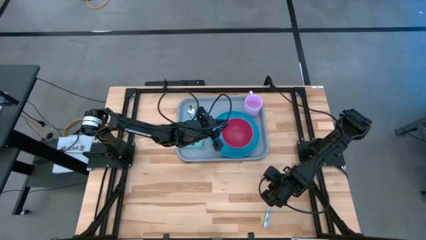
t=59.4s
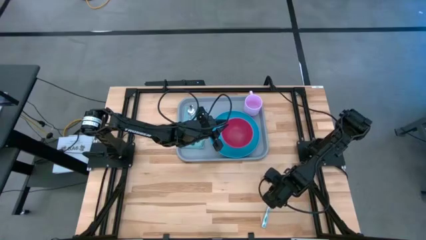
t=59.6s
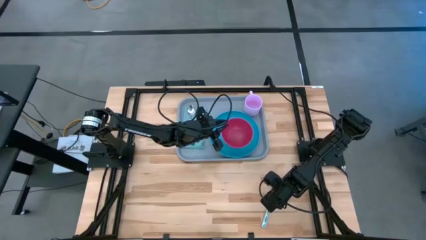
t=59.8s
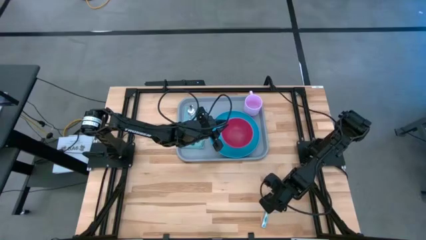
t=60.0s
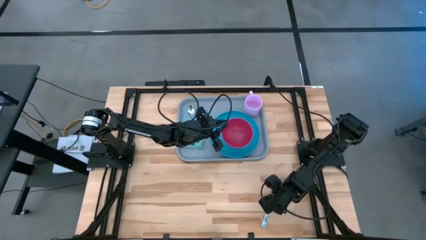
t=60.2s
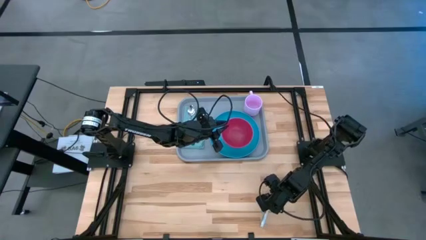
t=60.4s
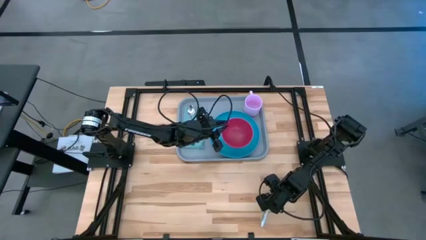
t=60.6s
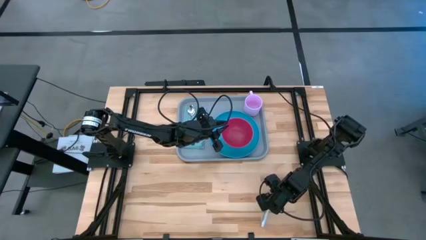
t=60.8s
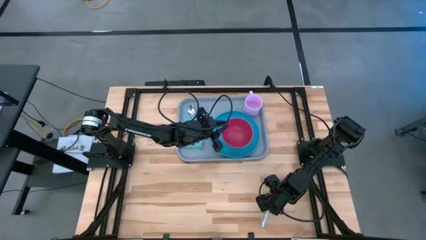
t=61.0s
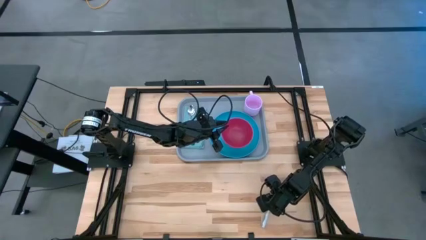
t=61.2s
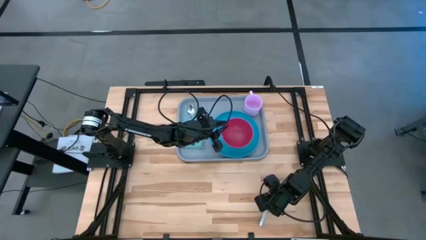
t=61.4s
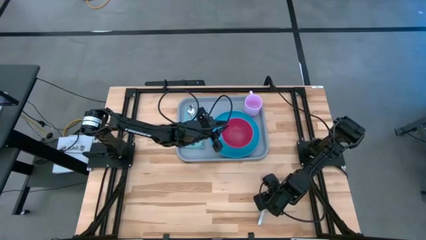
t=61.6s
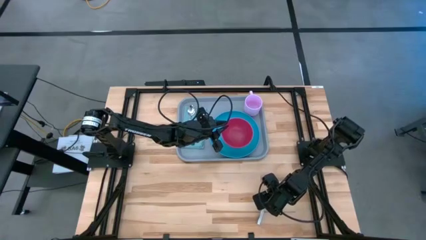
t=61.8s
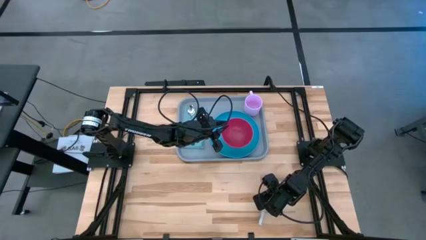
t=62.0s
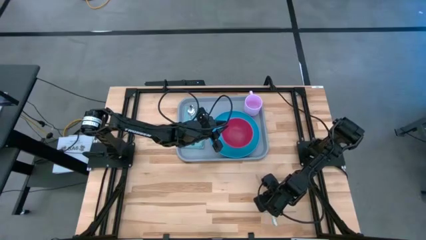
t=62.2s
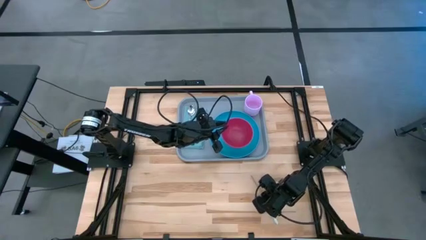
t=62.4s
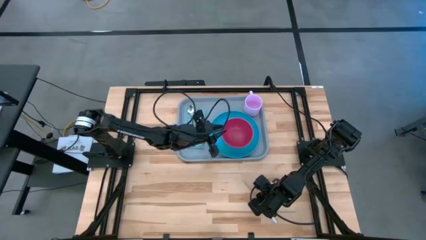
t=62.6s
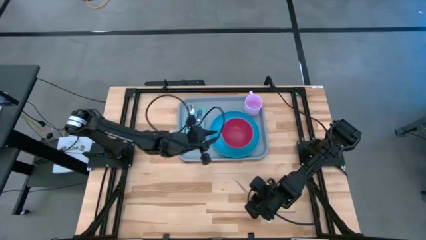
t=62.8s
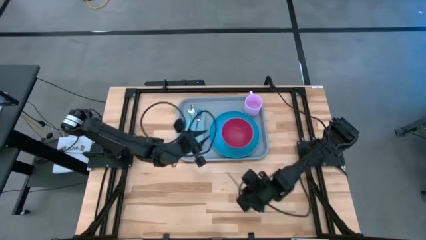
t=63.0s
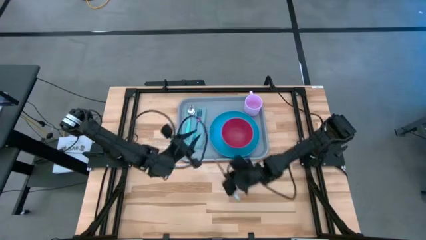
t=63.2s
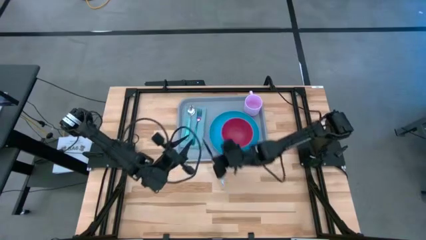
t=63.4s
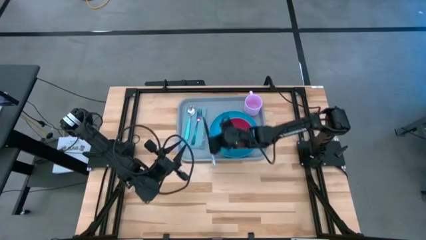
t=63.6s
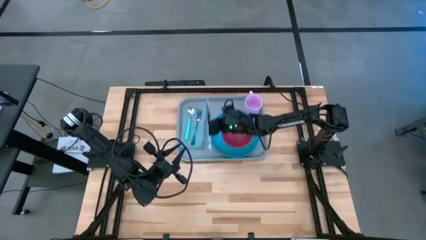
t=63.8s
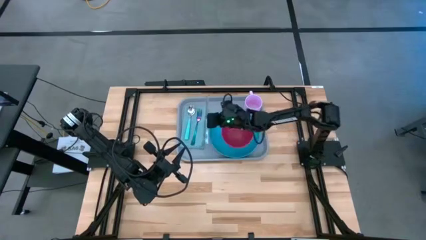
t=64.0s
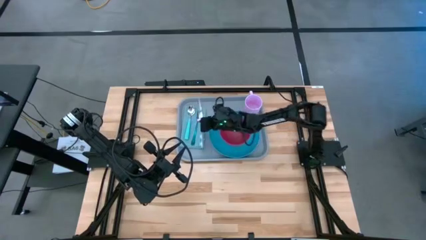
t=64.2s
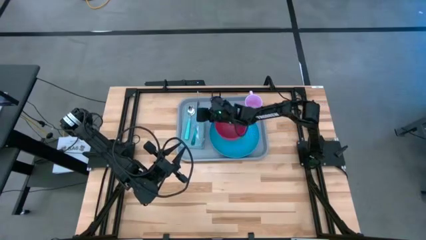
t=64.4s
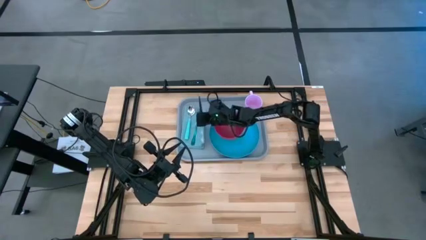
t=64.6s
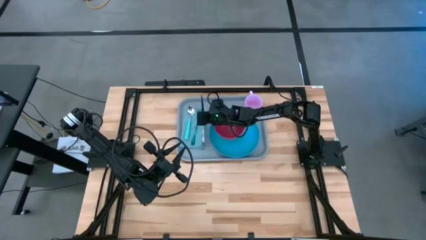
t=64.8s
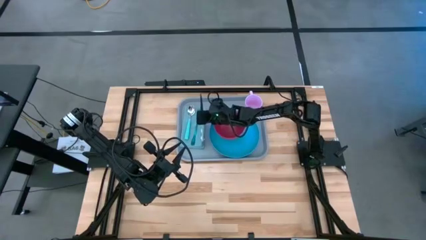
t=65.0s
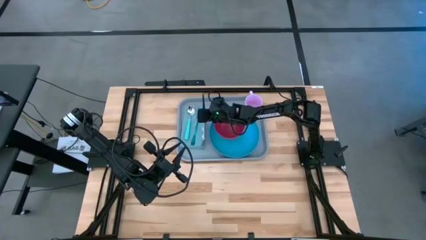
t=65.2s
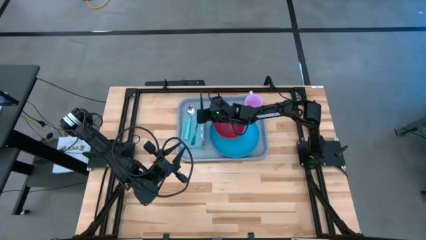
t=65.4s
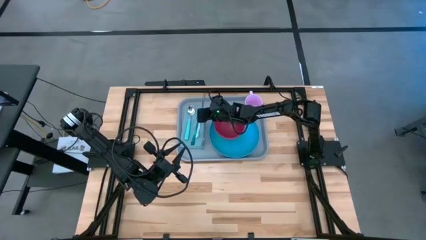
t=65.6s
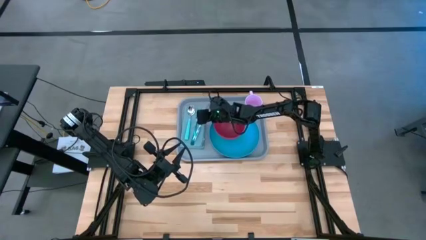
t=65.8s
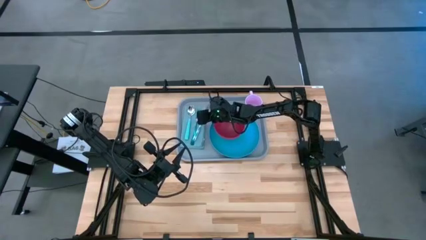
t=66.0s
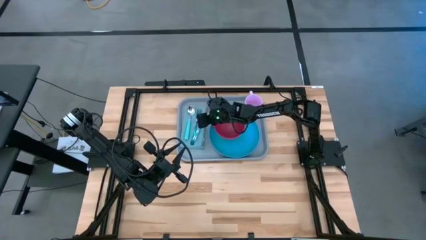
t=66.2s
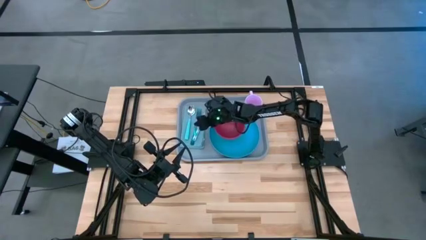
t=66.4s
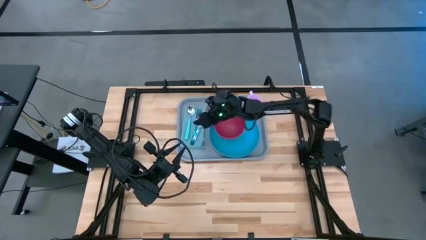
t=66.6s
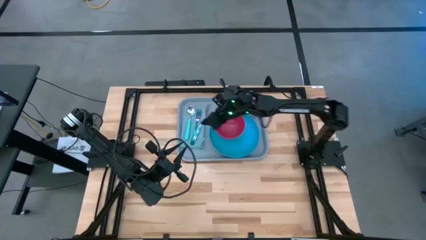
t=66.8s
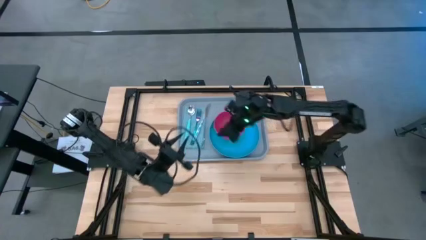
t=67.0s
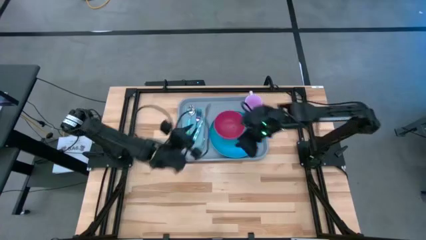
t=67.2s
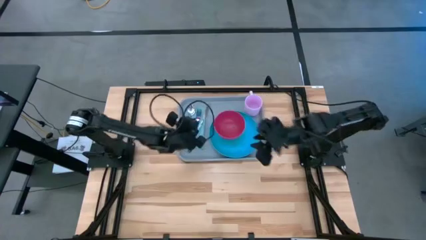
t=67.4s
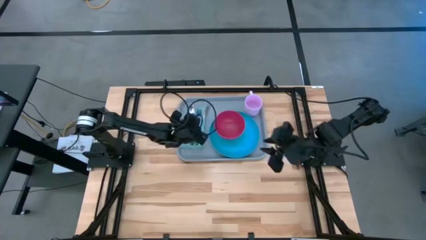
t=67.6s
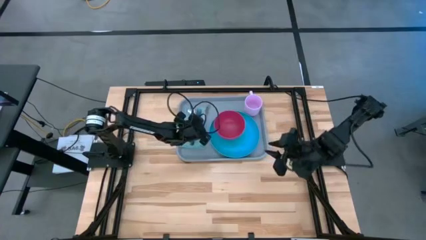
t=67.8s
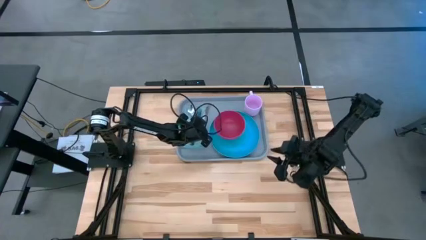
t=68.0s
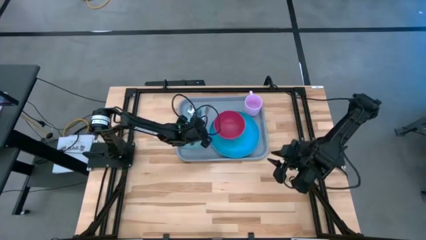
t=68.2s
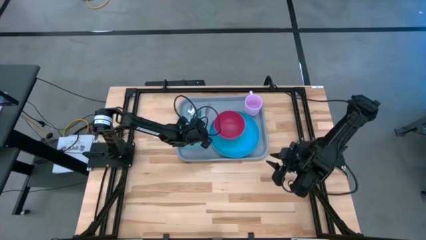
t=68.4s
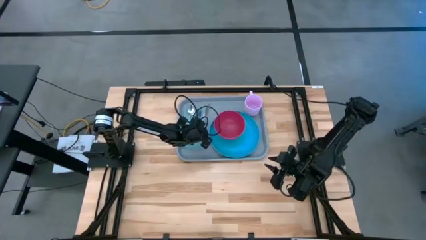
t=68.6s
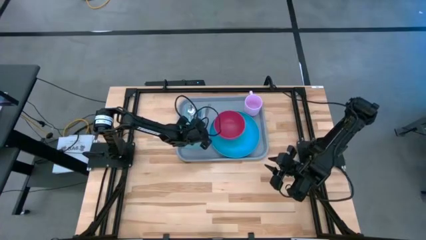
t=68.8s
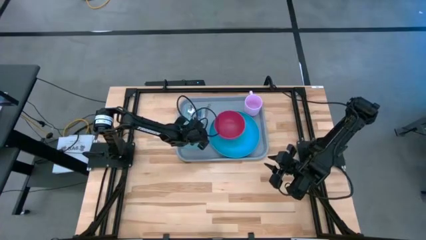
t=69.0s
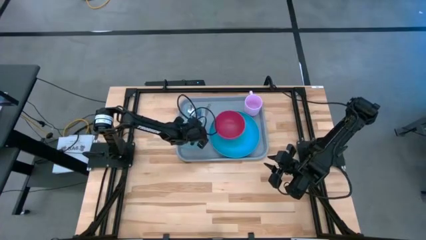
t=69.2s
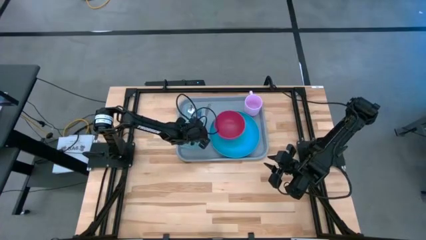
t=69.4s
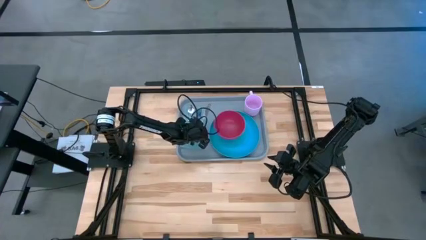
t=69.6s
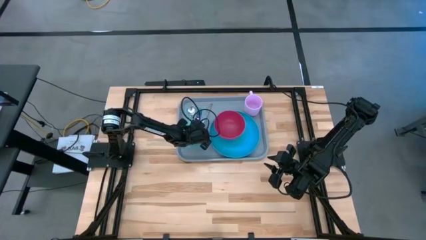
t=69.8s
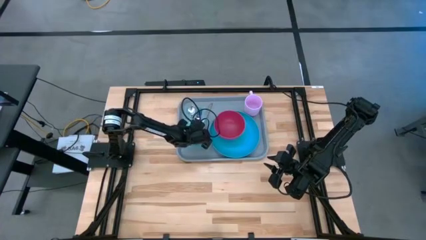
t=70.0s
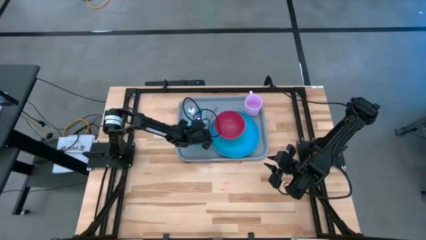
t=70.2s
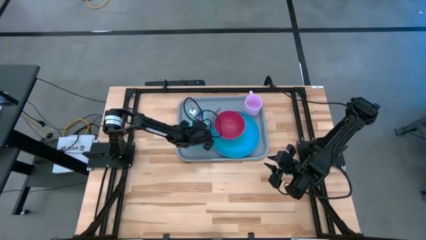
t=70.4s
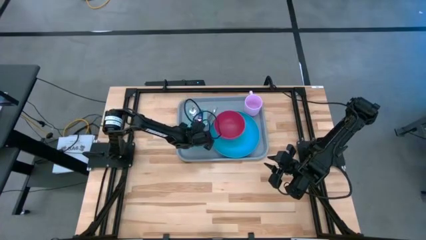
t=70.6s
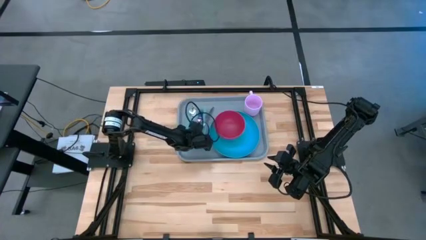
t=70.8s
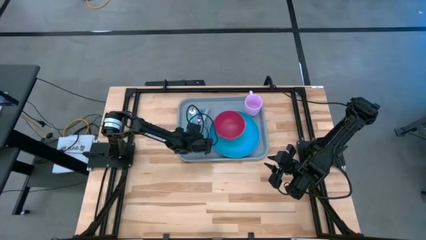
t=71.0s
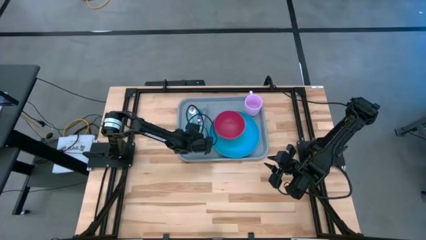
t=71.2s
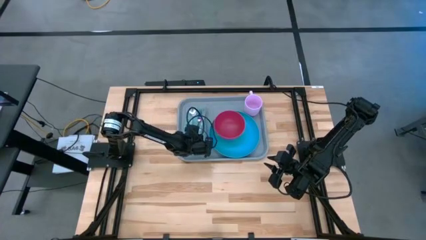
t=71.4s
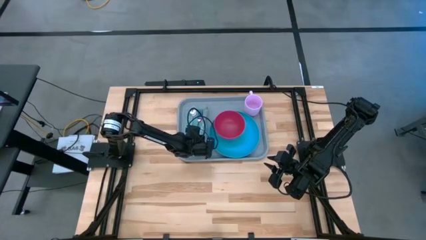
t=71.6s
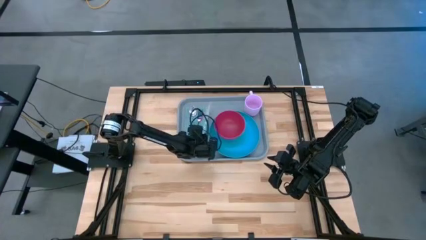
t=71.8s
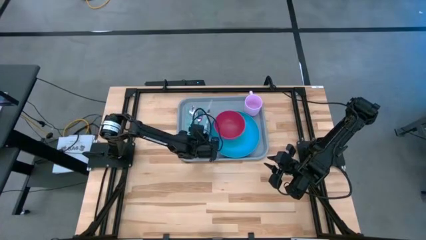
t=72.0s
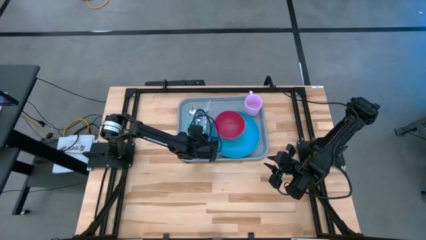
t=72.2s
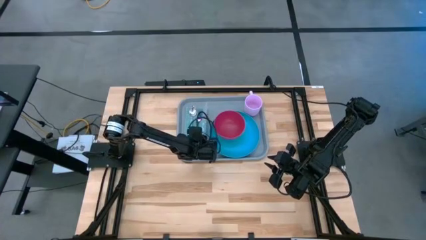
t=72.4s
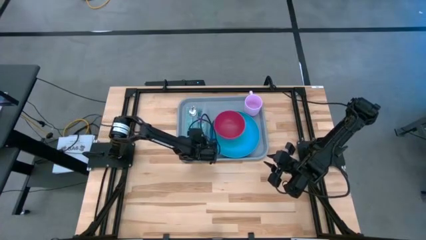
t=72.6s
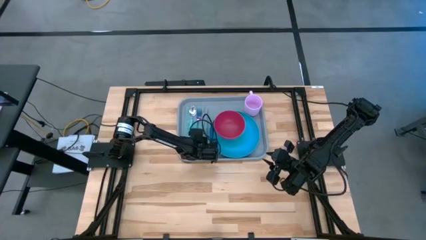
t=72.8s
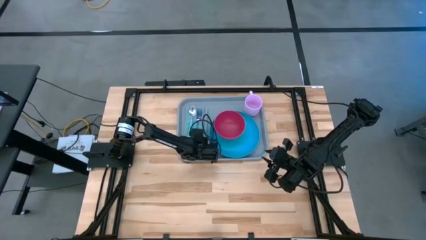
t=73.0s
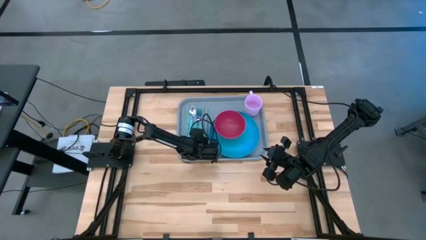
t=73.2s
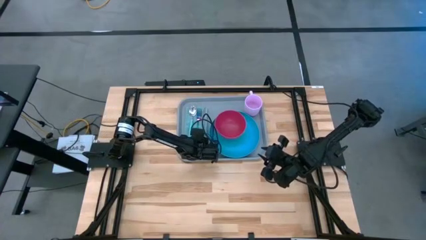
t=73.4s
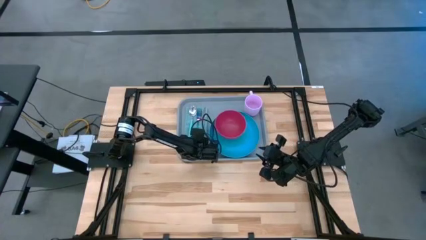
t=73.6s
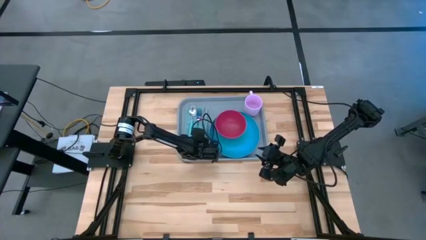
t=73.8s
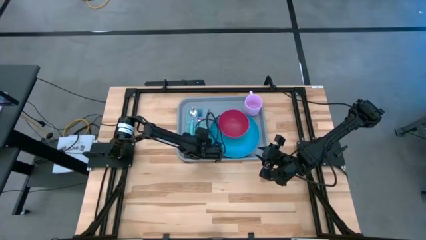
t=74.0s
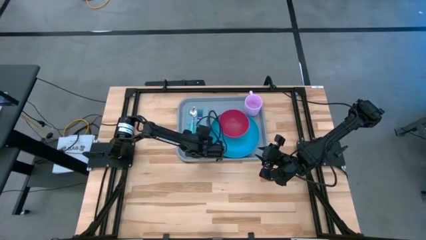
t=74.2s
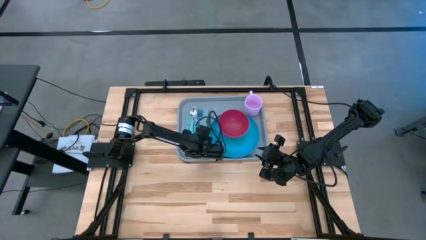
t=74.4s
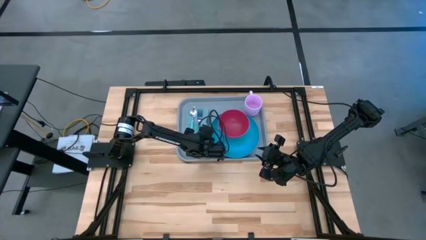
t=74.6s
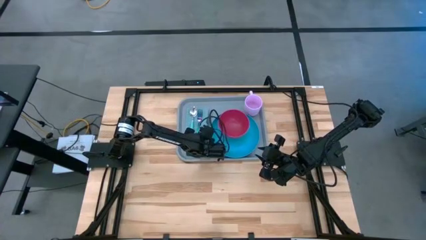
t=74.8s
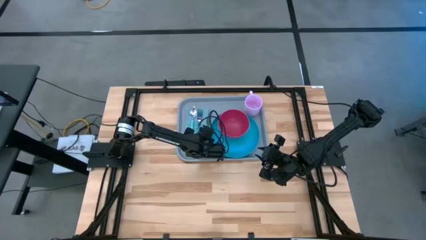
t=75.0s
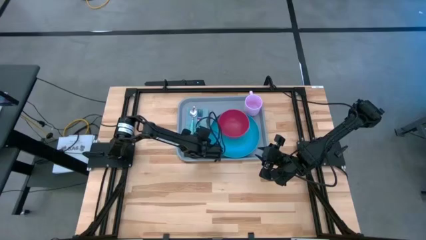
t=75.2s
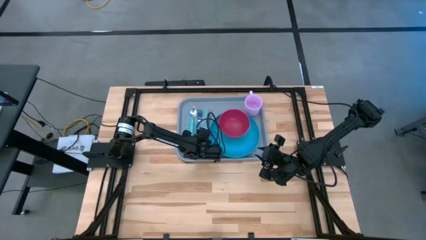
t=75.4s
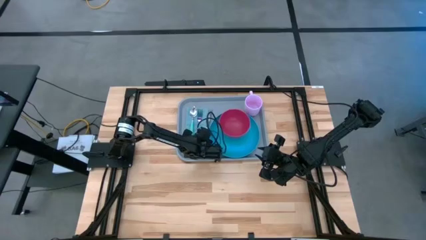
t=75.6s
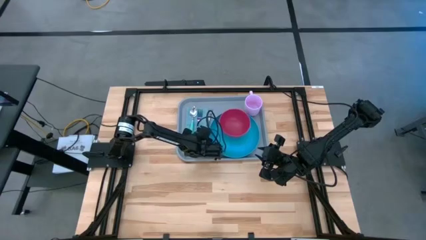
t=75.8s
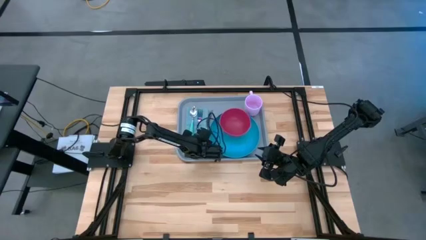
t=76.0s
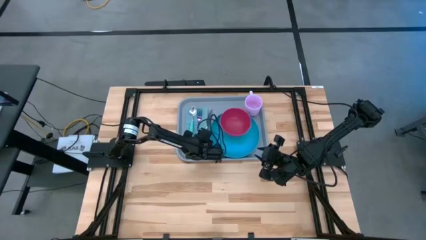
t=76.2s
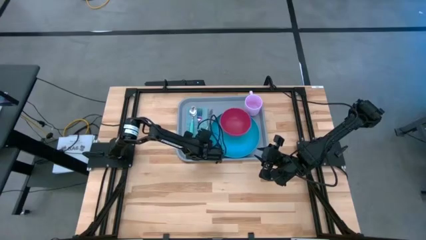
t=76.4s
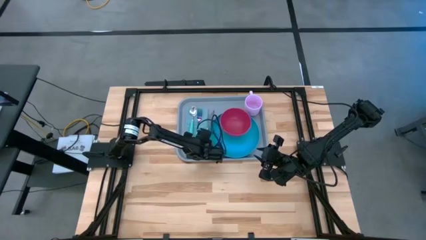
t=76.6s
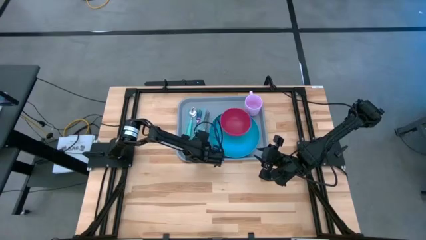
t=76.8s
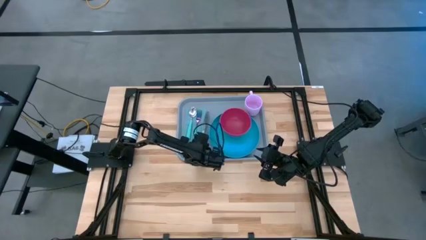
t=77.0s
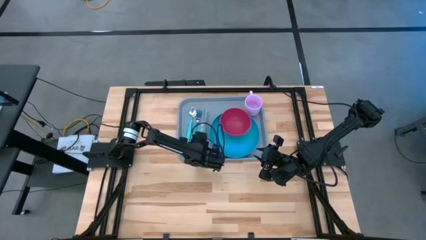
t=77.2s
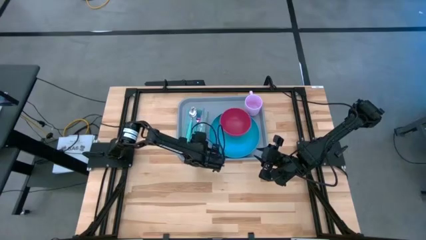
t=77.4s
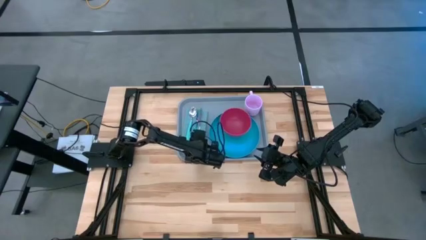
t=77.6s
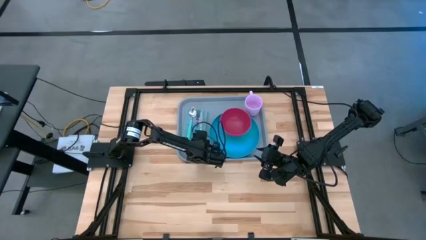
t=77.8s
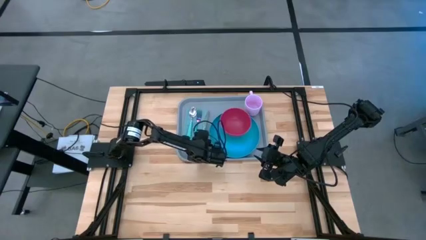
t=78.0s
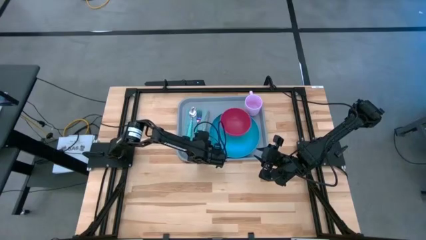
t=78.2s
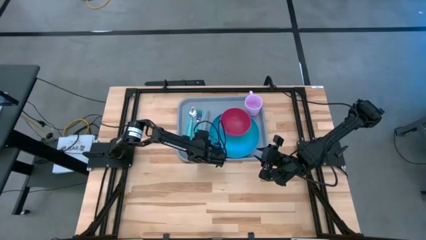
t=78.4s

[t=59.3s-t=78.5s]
Task: Set up tray
Put the white knife on the blue napkin
